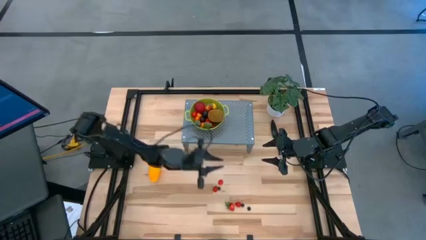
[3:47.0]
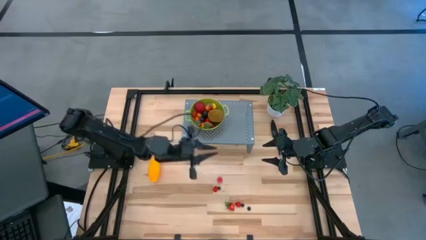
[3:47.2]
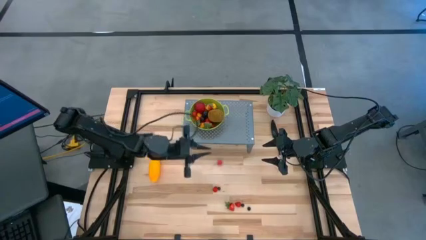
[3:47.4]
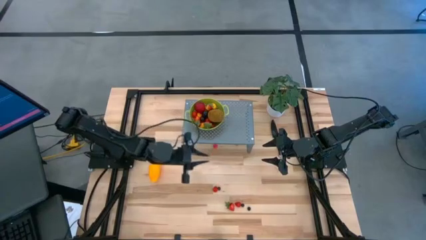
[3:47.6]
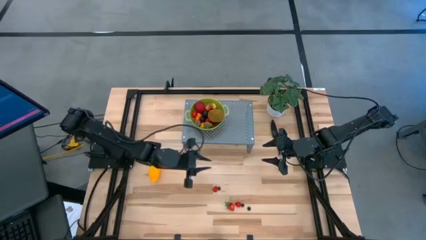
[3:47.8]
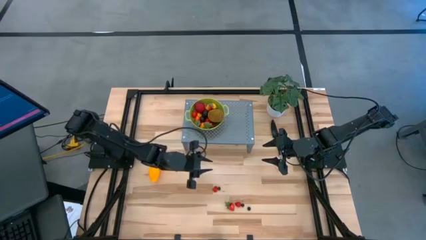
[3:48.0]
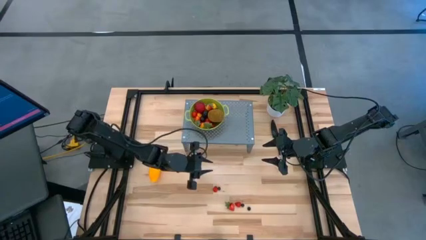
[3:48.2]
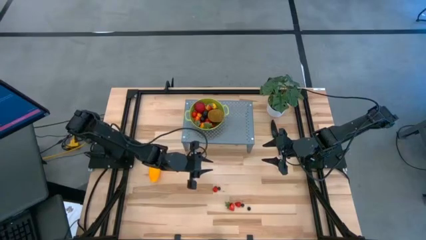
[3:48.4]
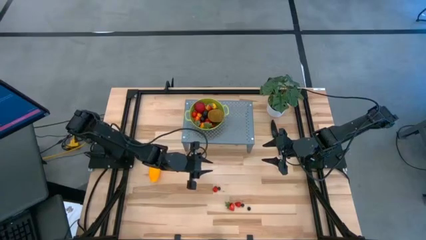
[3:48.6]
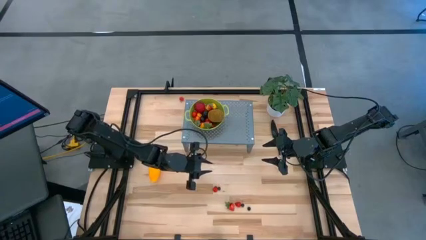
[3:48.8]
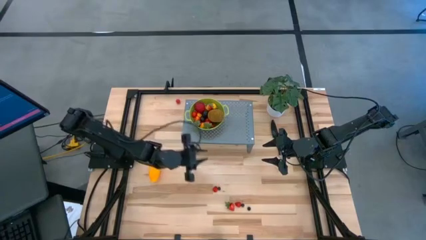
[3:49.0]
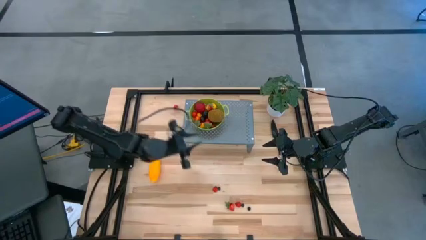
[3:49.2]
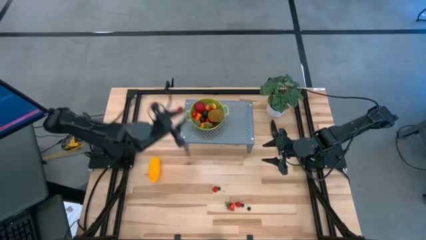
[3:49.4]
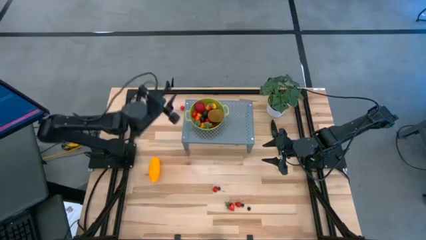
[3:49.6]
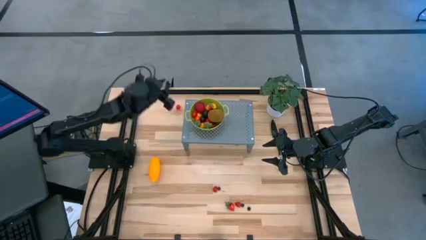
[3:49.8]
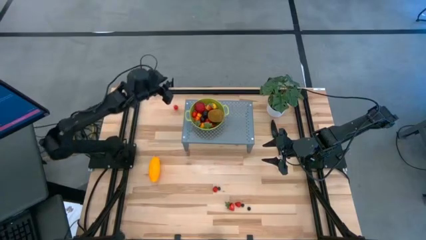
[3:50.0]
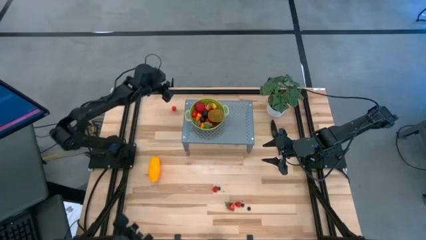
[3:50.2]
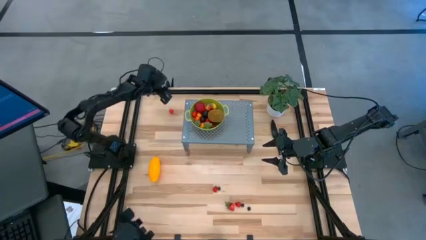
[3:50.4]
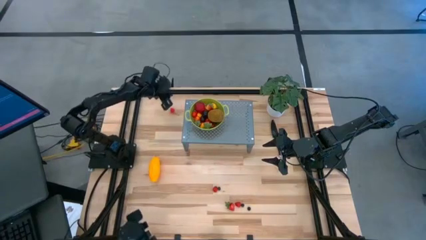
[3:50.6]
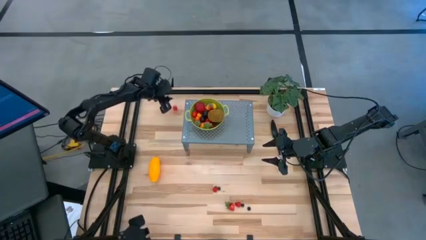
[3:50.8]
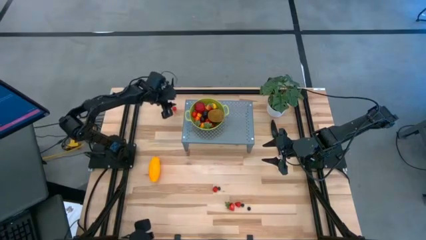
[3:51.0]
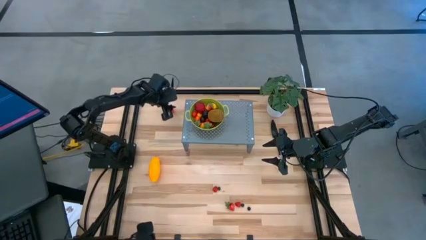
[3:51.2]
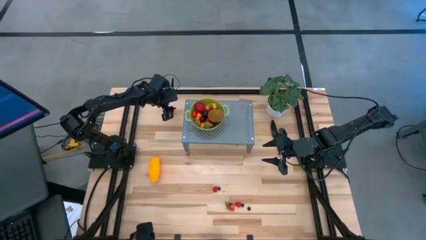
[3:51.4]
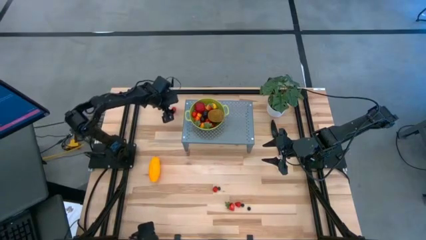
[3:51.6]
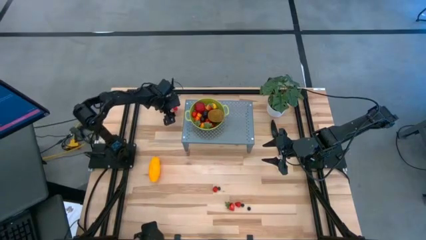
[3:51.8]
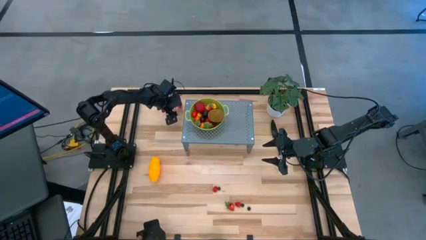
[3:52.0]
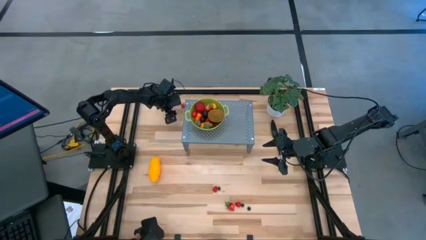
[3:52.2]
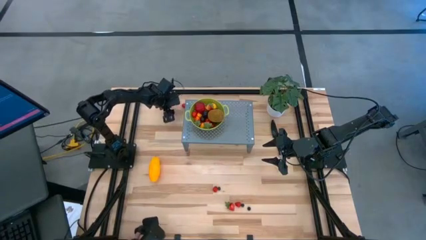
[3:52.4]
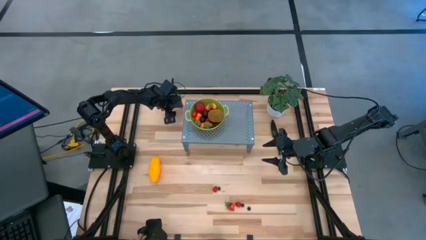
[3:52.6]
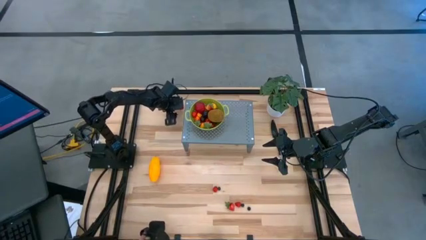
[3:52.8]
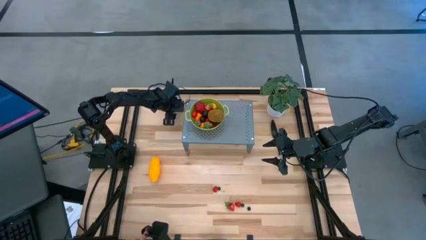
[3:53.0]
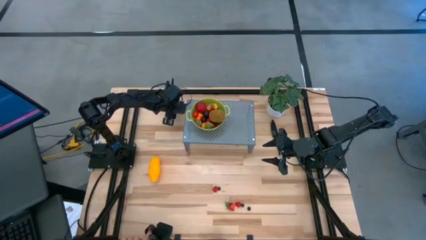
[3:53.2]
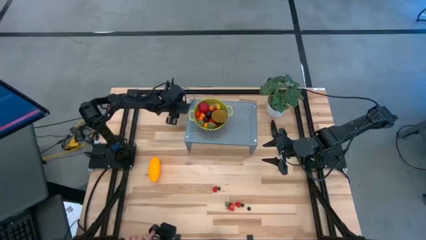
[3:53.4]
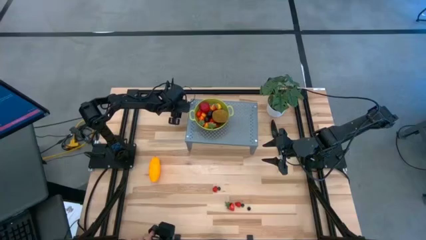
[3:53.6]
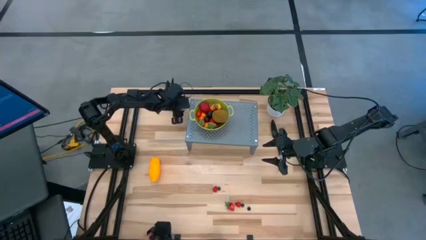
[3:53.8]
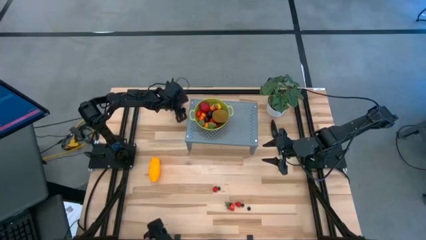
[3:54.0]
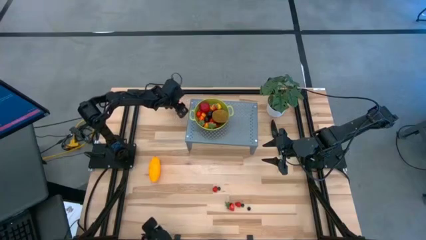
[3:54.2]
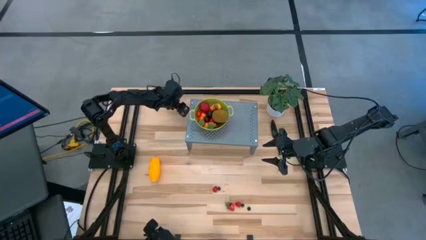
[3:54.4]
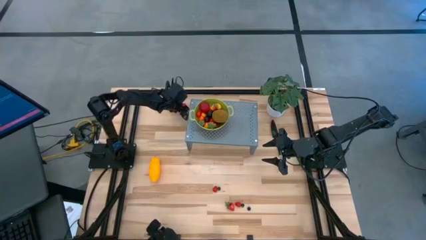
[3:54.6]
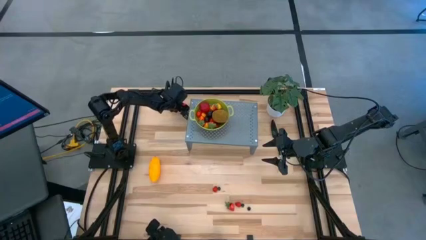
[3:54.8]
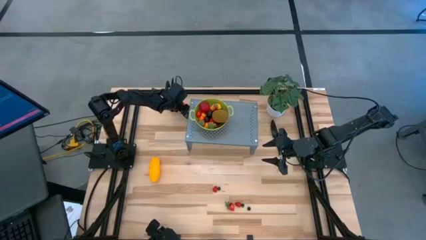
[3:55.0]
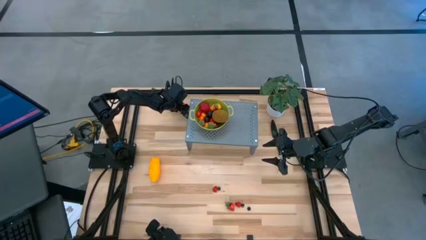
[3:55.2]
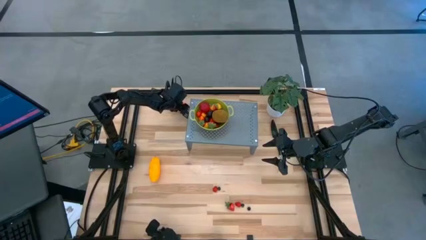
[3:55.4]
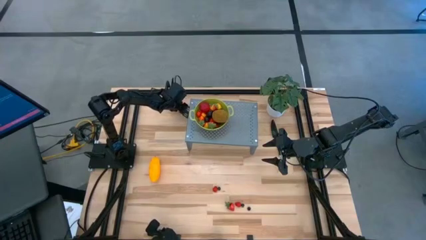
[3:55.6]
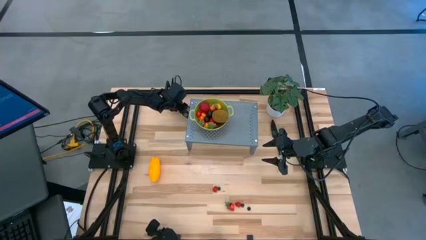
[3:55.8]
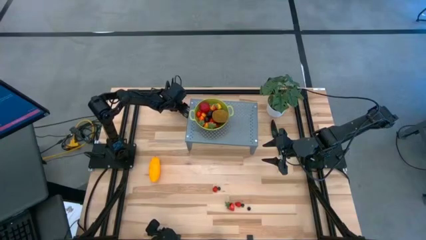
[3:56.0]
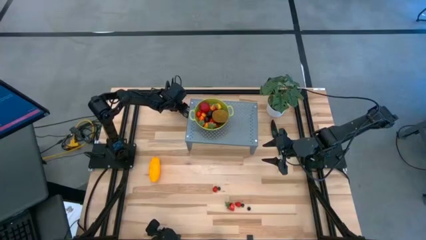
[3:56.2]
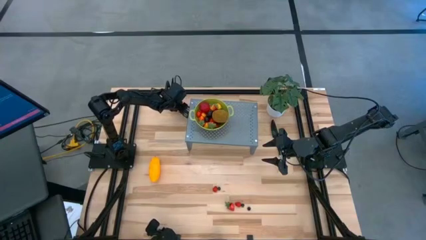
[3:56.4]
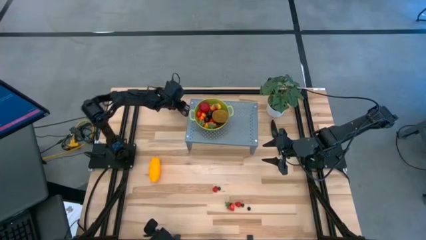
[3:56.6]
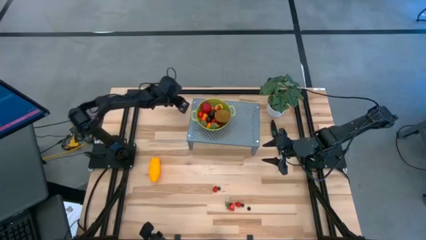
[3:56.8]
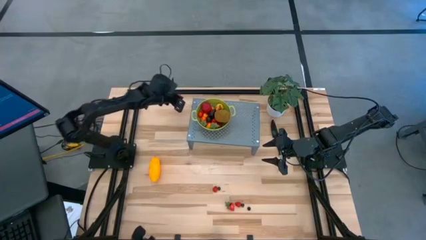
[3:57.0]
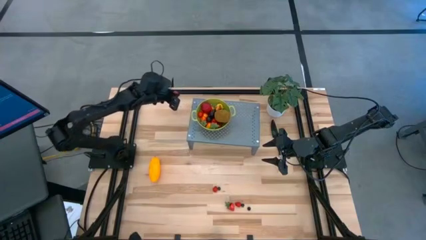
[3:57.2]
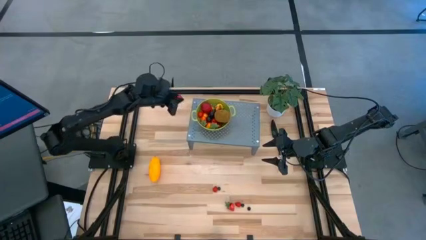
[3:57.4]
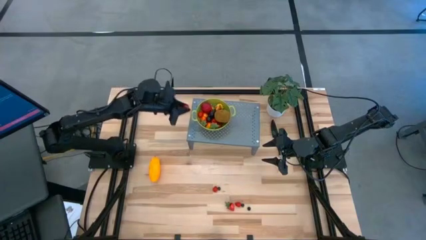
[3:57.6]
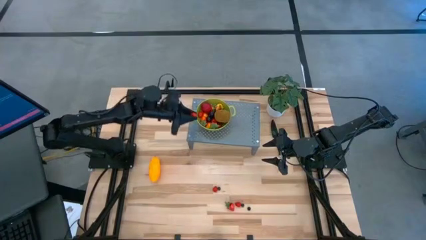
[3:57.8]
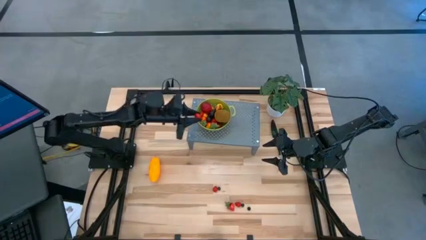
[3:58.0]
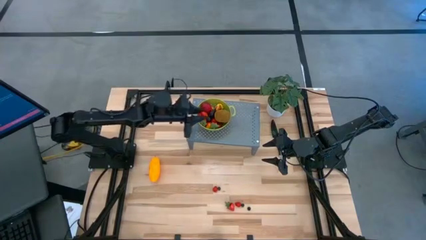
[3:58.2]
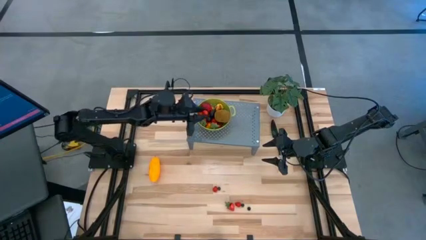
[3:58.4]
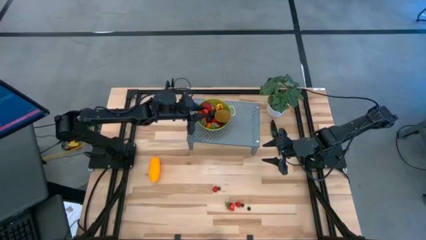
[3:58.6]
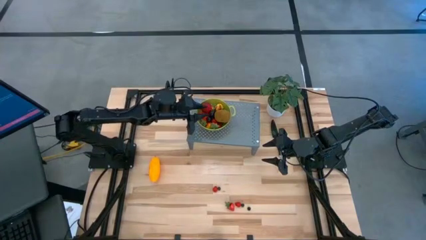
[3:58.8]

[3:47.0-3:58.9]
Task: Pick & Place Fruit
Put the red cherry into the green strainer bowl on the shelf

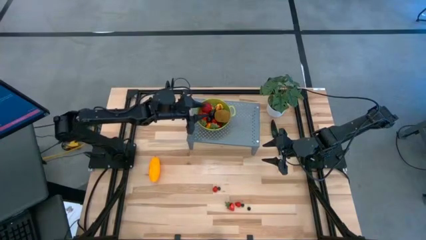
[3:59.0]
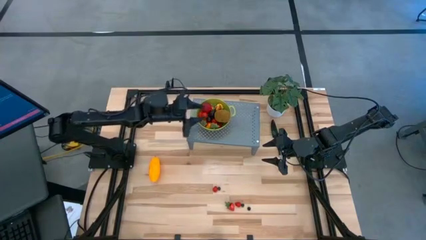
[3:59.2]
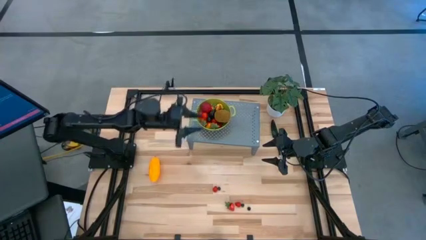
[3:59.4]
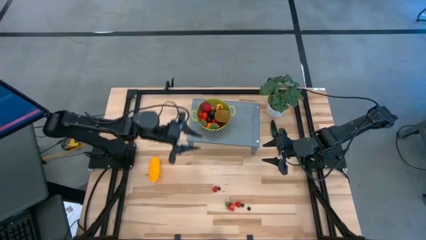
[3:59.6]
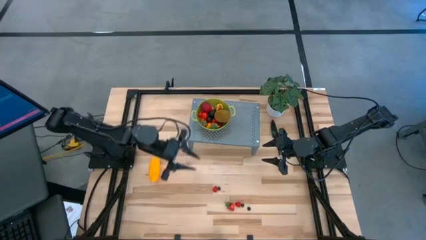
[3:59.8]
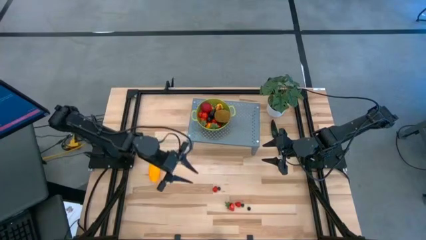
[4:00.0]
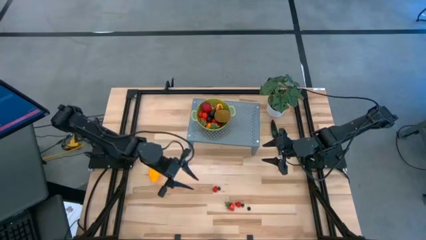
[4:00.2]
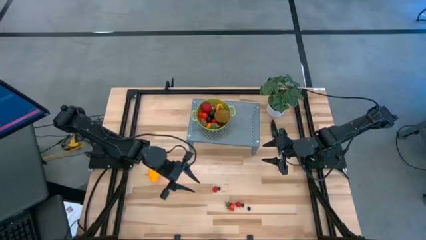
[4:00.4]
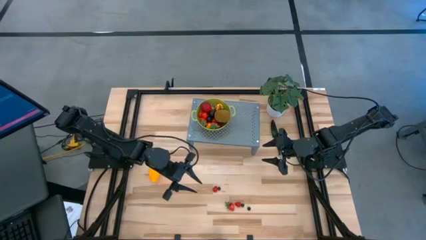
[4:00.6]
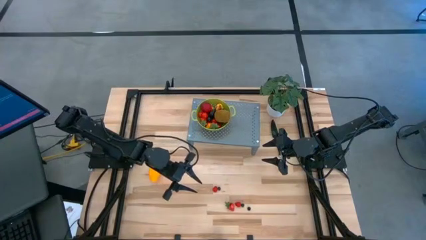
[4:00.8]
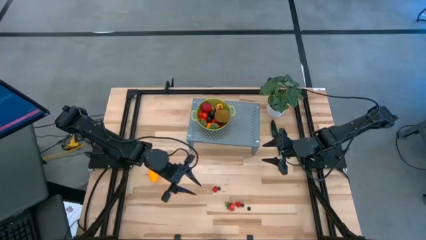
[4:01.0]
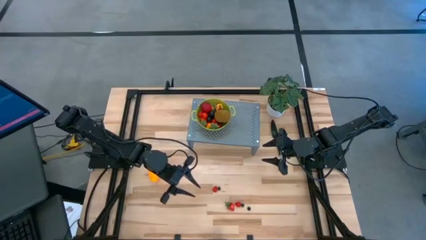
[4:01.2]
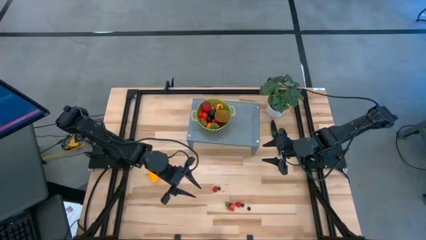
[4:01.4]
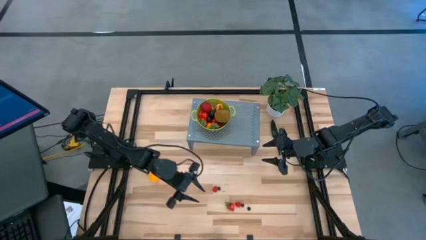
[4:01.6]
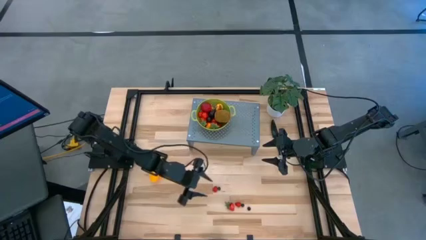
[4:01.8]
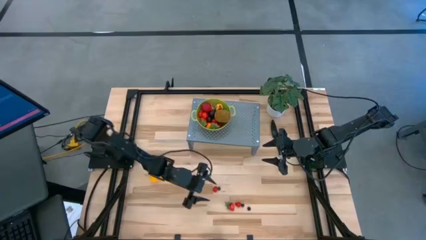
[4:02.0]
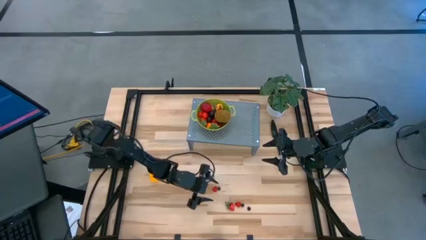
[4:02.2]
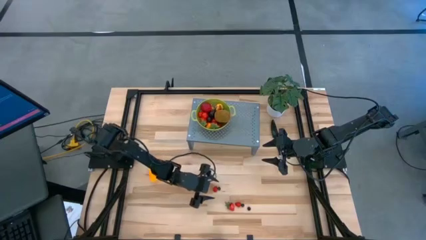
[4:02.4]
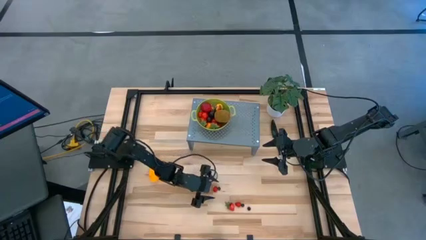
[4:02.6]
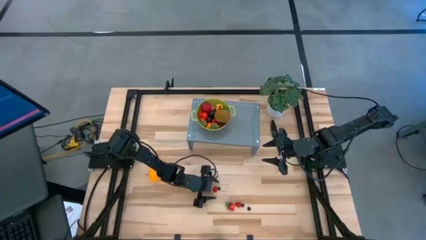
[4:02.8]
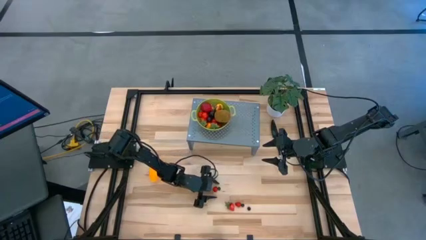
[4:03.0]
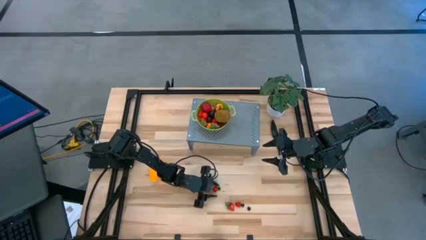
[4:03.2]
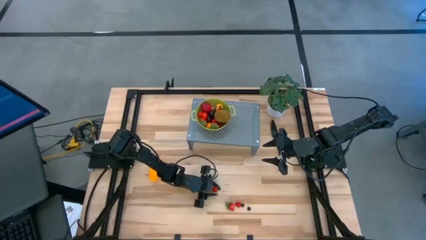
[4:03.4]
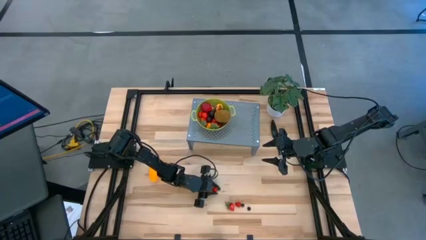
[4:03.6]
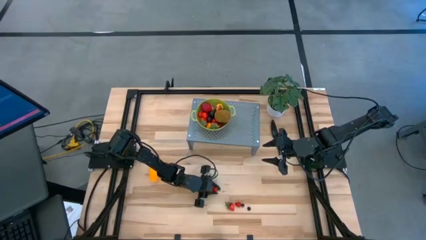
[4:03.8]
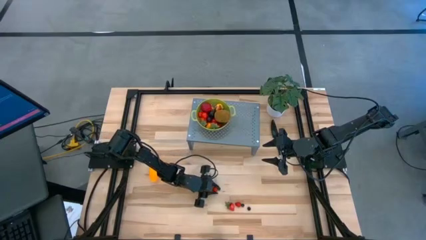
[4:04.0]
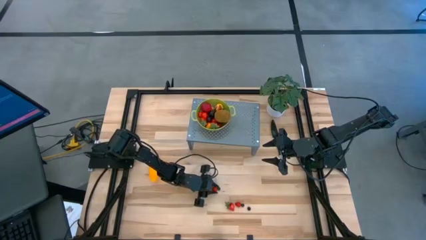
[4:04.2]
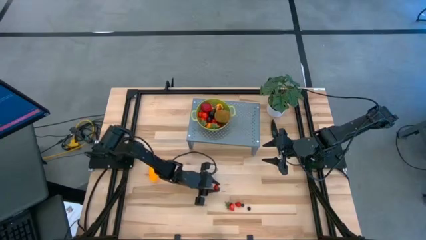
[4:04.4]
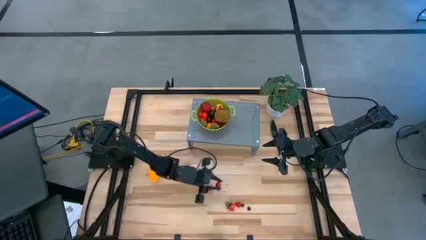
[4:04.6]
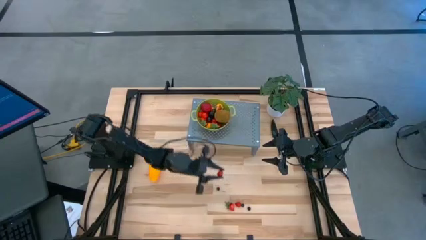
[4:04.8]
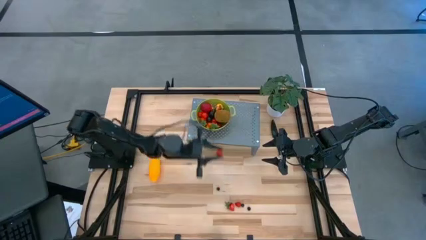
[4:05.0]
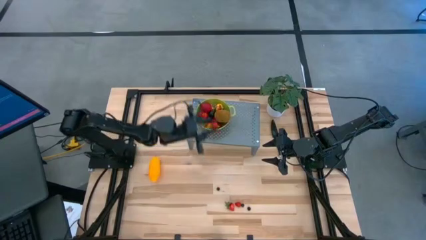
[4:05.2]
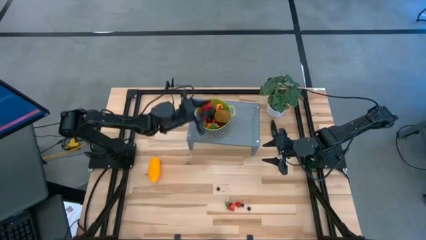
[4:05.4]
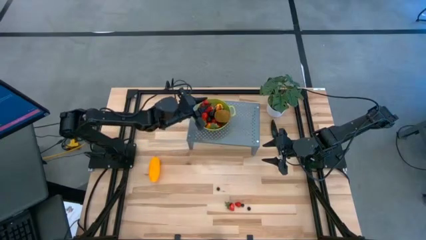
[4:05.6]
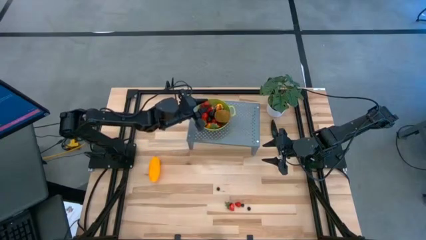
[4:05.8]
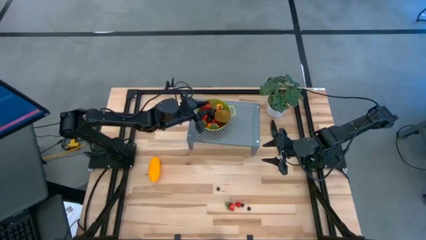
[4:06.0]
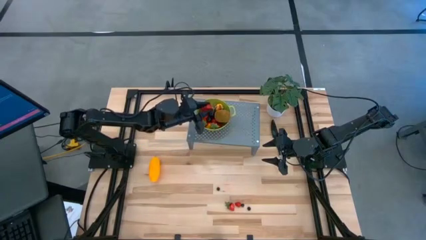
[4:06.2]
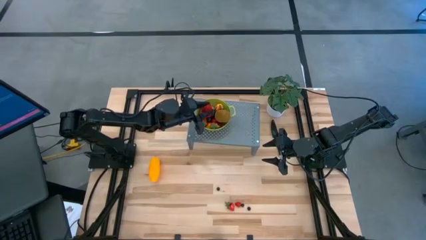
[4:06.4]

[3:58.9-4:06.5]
Put the red raspberry into the green strainer bowl on the shelf
